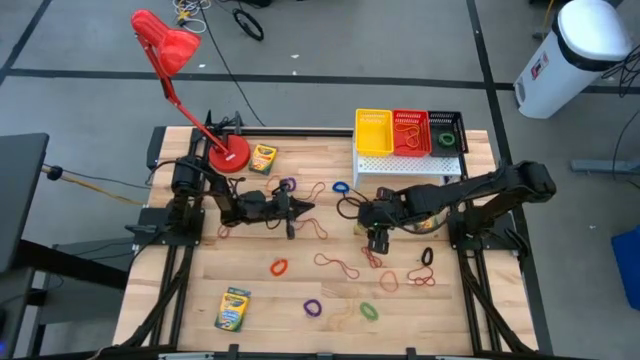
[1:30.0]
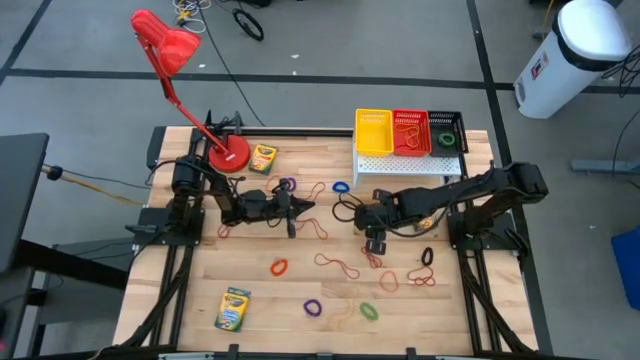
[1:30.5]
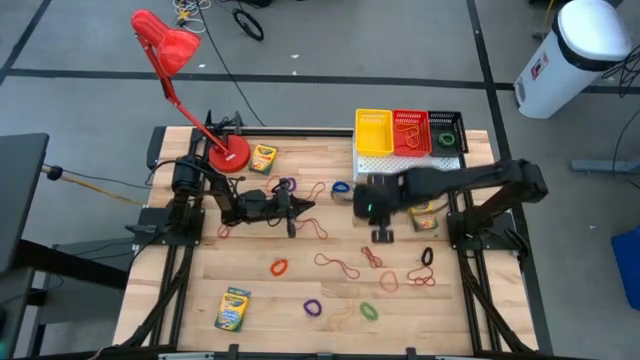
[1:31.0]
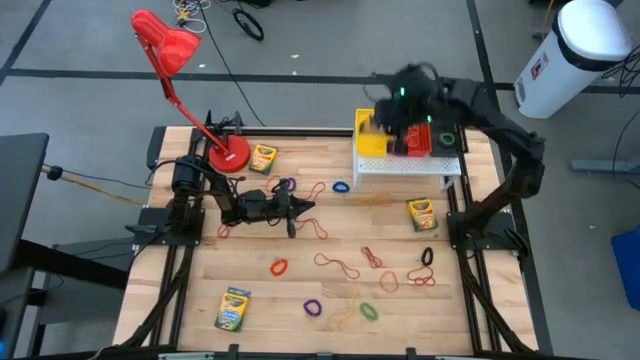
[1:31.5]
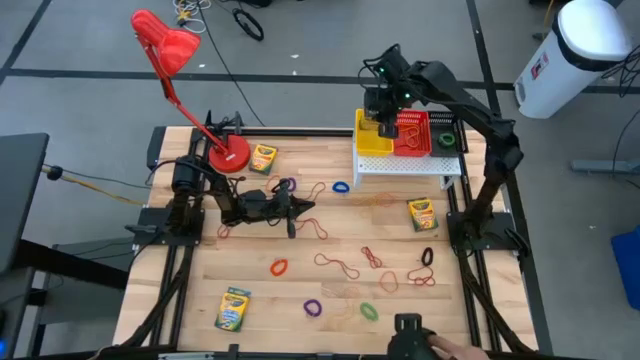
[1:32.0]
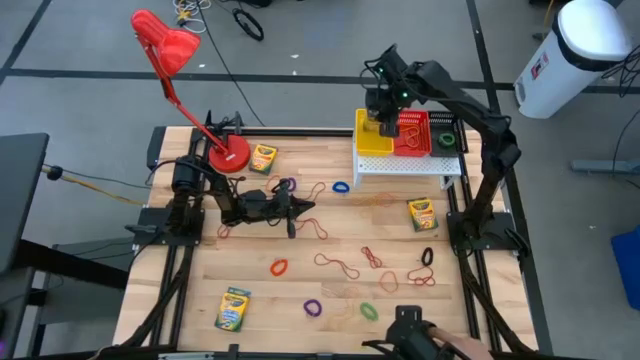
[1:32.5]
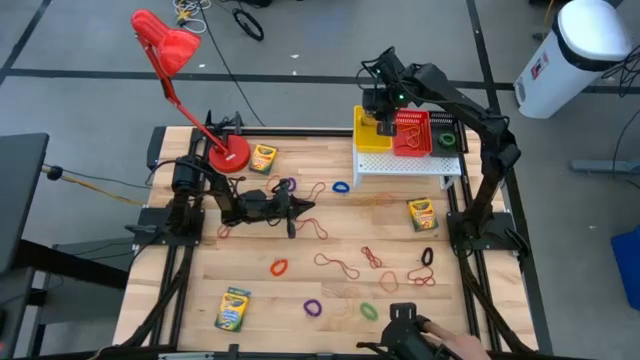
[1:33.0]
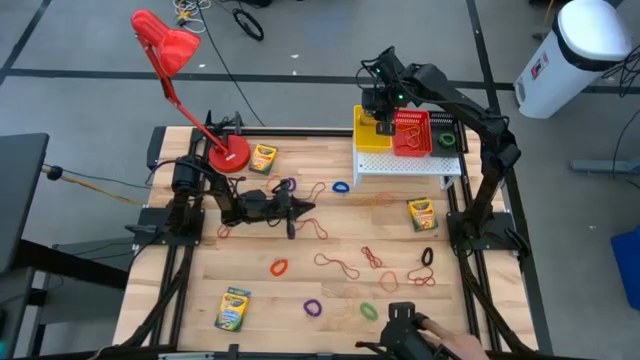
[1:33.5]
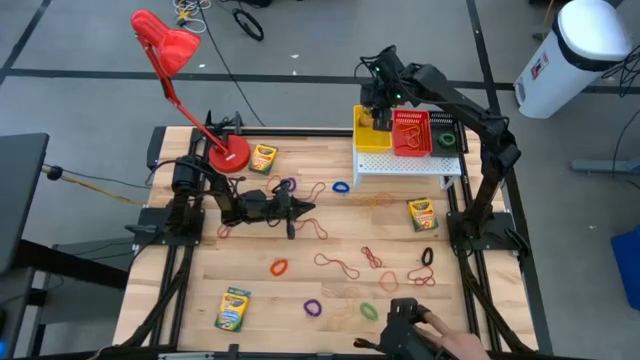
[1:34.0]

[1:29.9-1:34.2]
Task: Pick & Place Office Desk Supplies
Put the yellow crayon box on the yellow basket

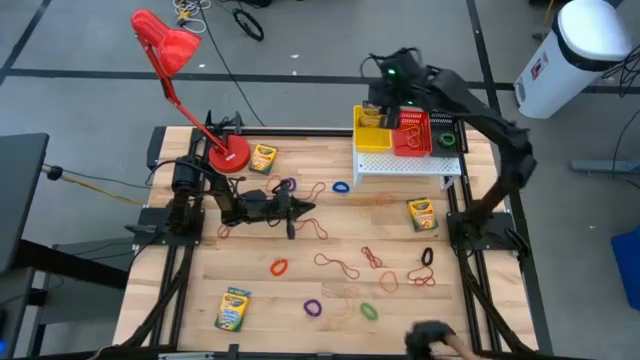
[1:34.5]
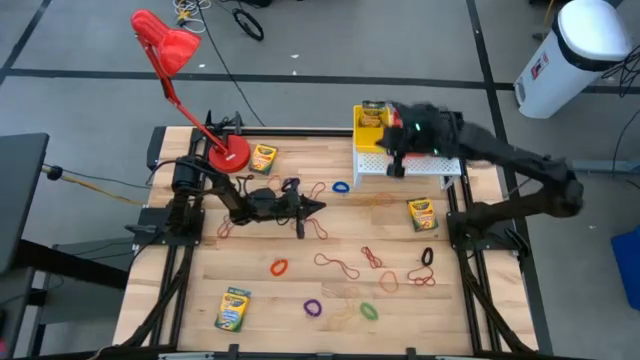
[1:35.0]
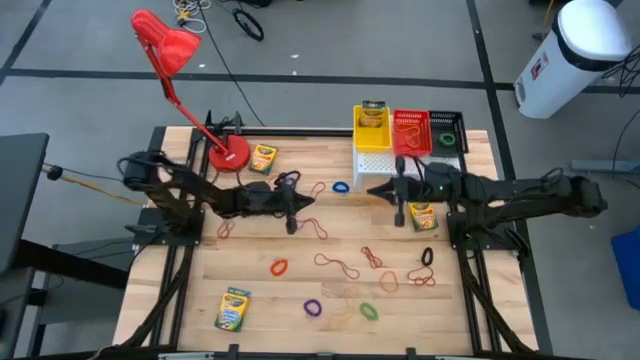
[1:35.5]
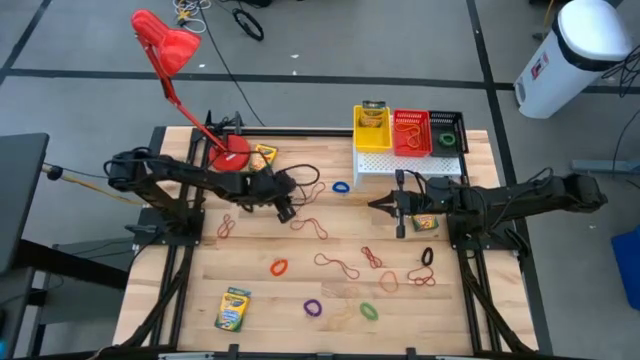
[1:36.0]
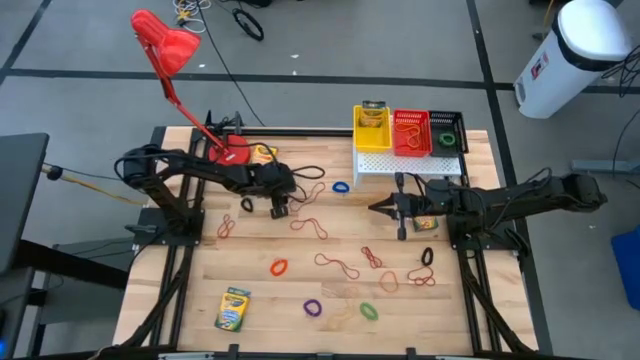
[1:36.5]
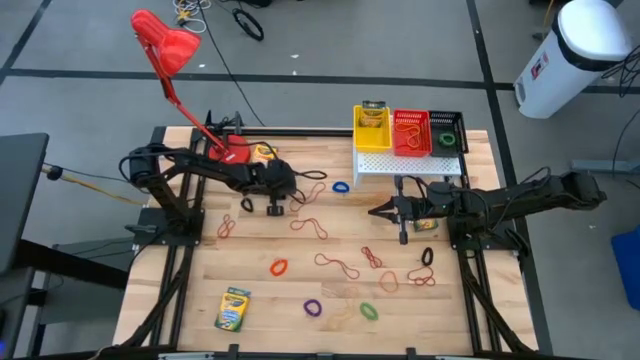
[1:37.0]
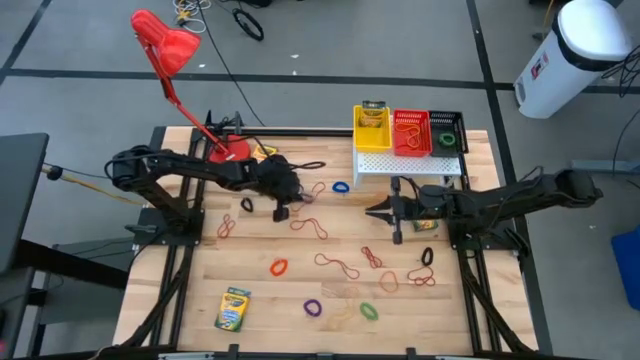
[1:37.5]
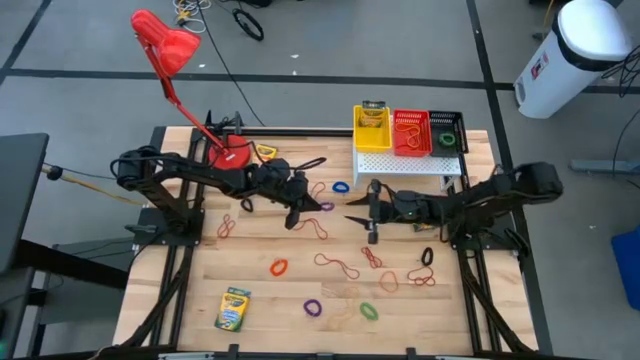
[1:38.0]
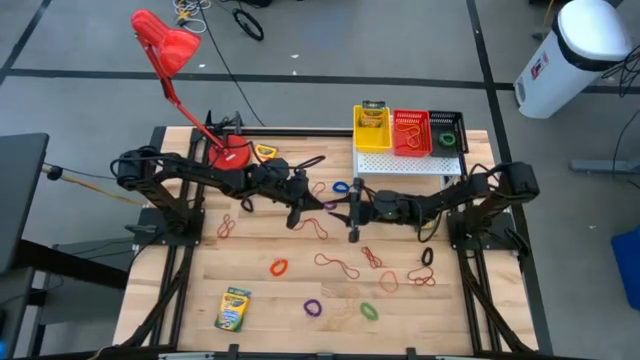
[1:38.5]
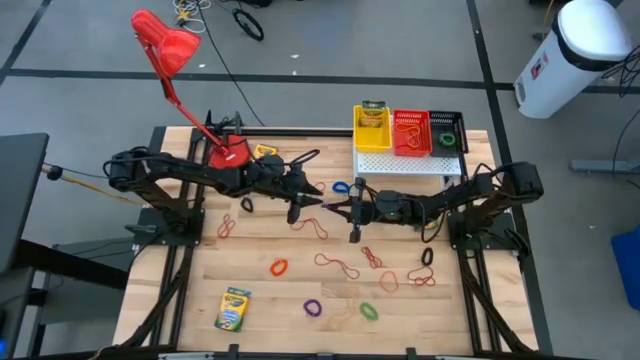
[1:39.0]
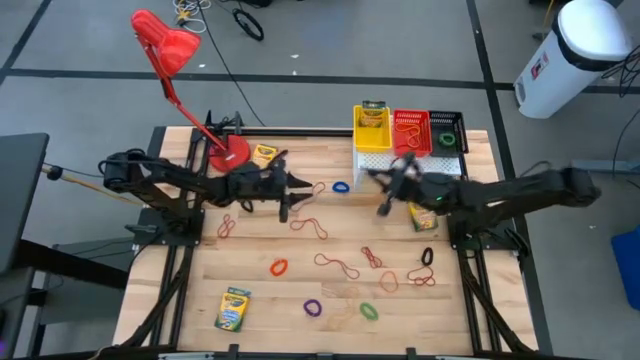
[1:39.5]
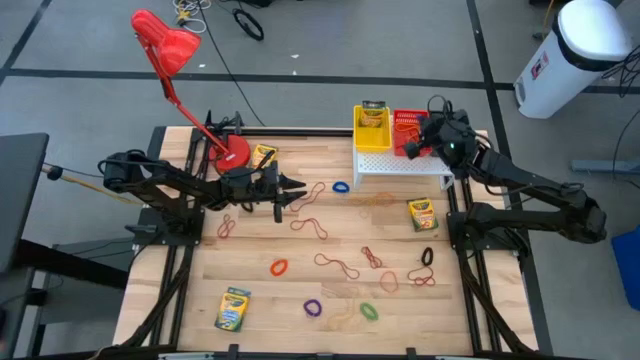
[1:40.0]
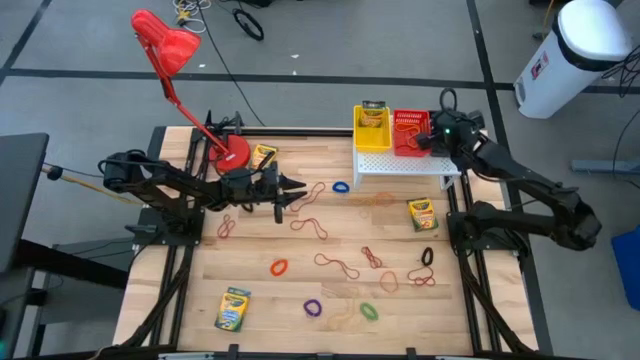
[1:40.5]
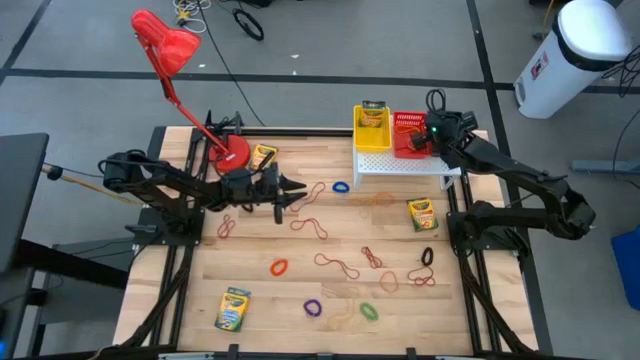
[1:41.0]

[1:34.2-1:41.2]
Put the purple spring keychain on the black basket

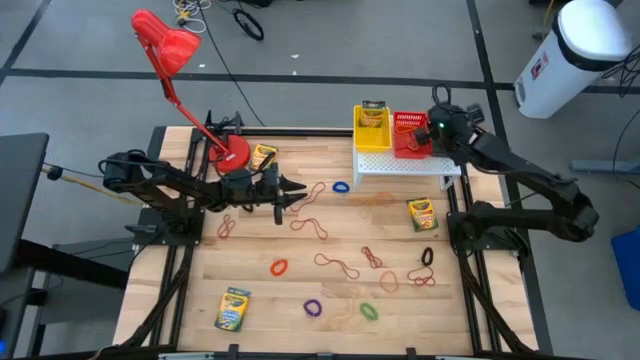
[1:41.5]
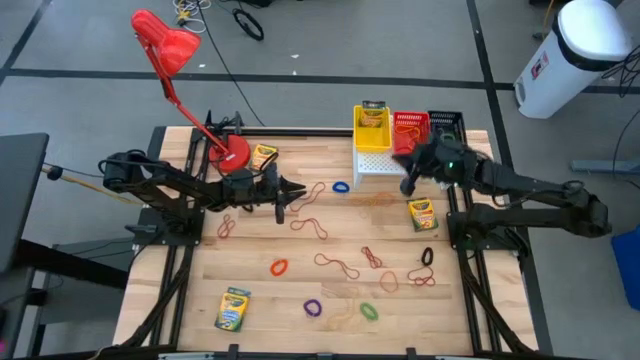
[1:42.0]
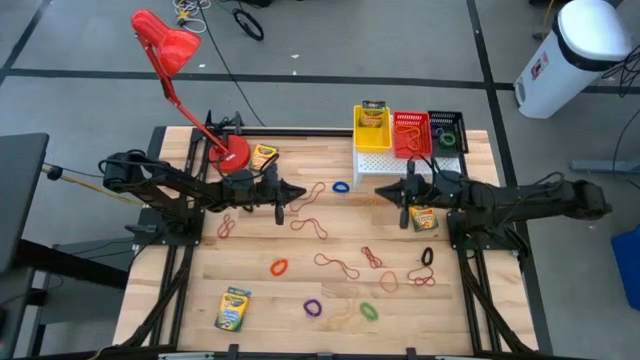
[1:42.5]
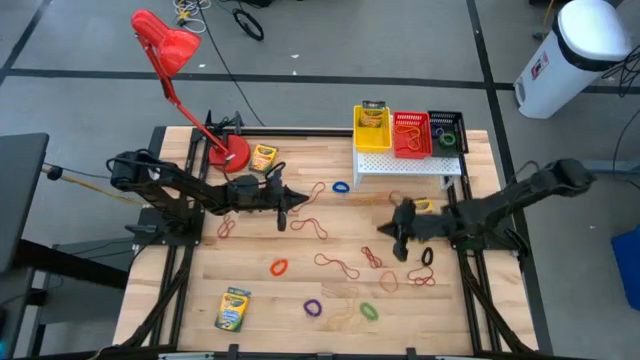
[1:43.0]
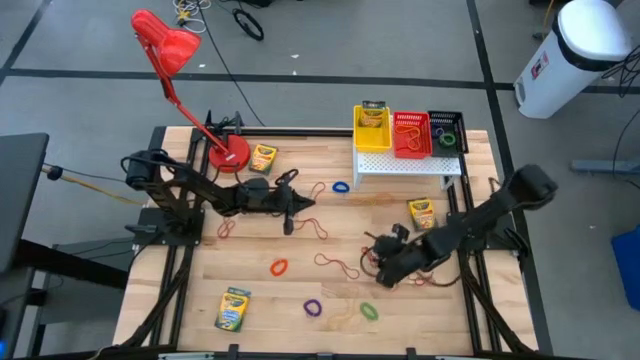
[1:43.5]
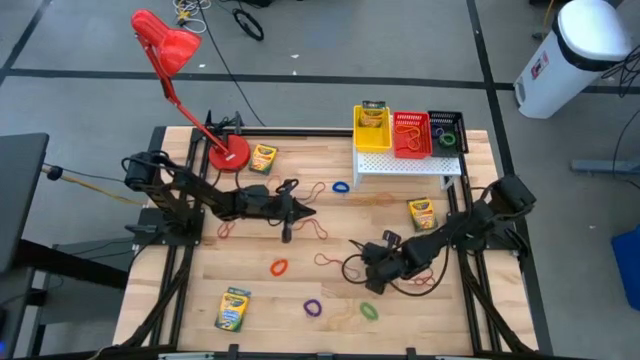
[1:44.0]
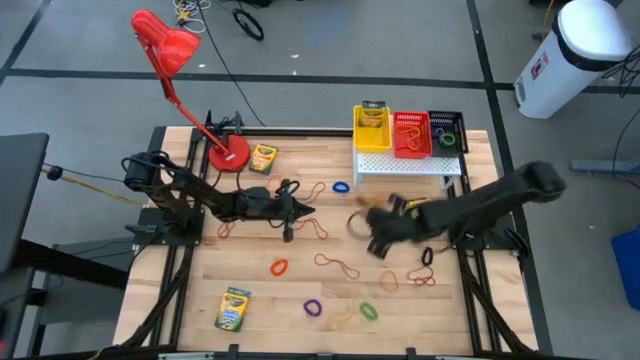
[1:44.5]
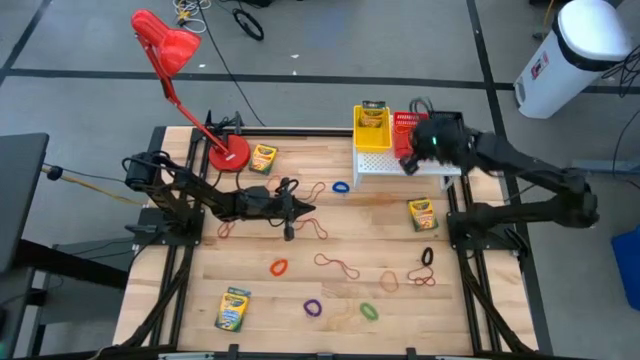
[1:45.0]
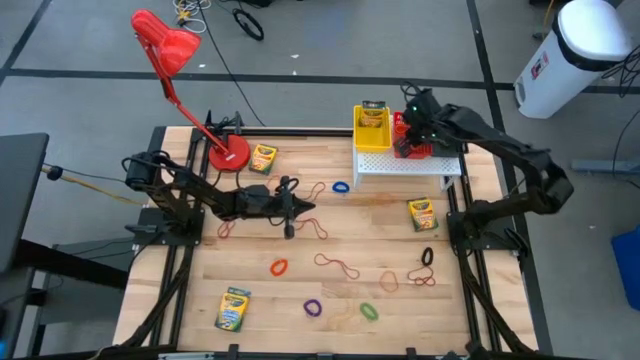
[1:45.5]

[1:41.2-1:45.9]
Put the red rubber band on the red basket

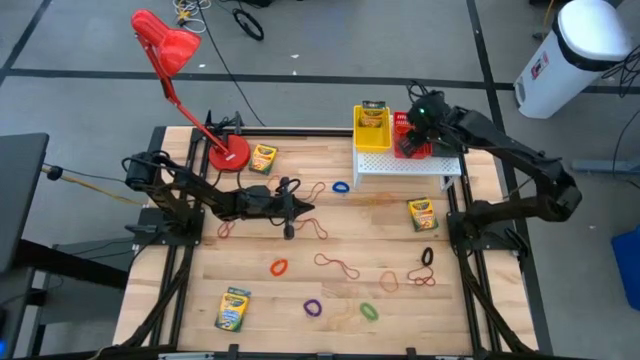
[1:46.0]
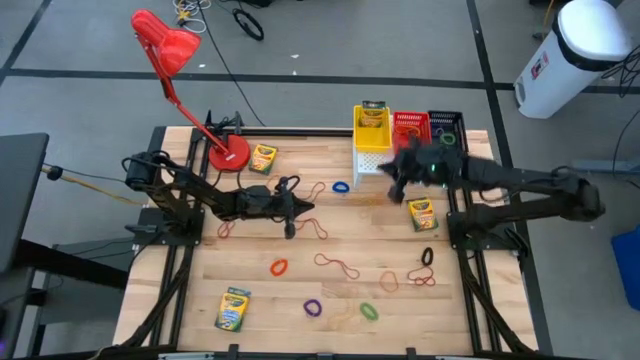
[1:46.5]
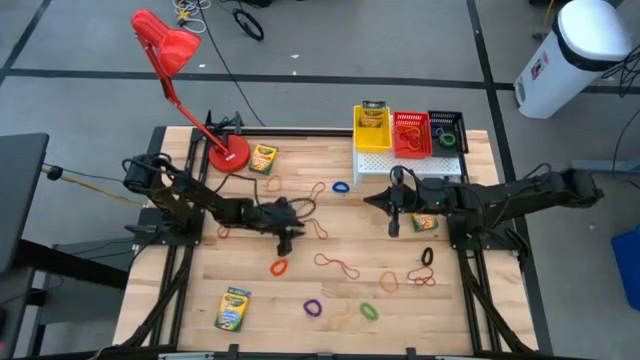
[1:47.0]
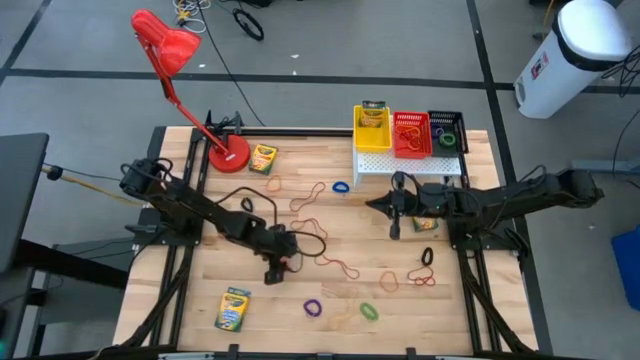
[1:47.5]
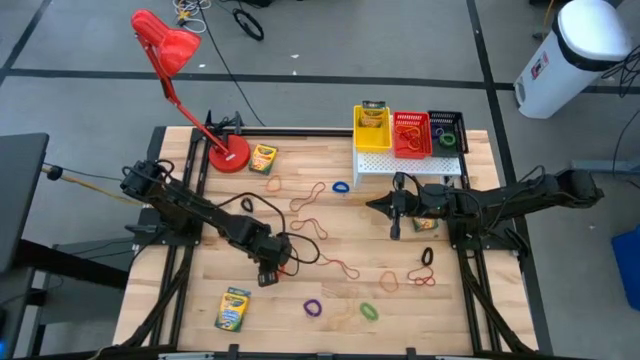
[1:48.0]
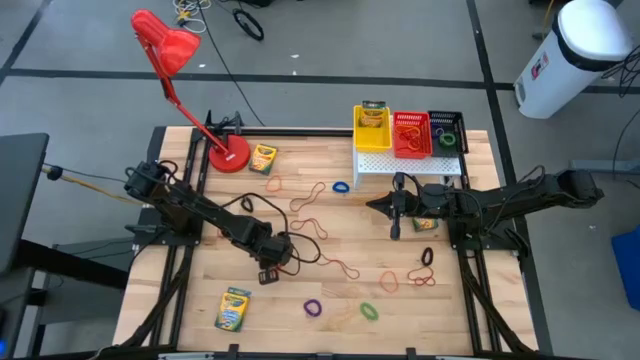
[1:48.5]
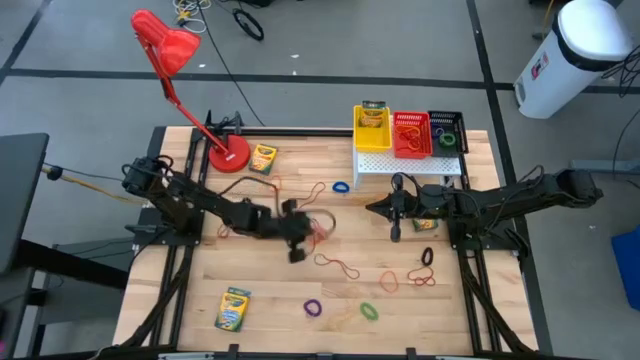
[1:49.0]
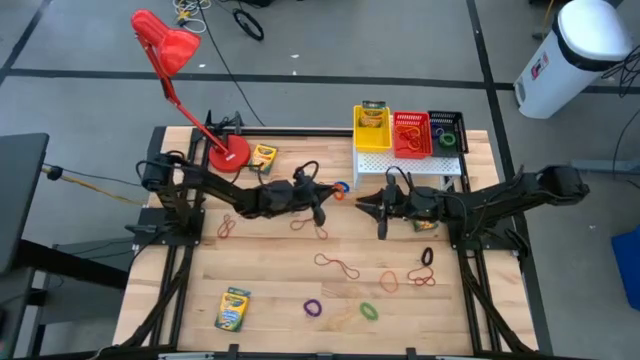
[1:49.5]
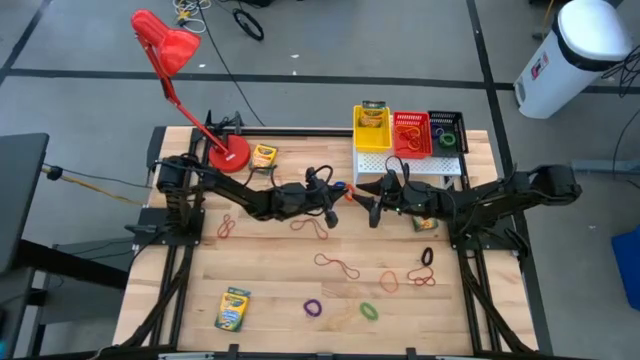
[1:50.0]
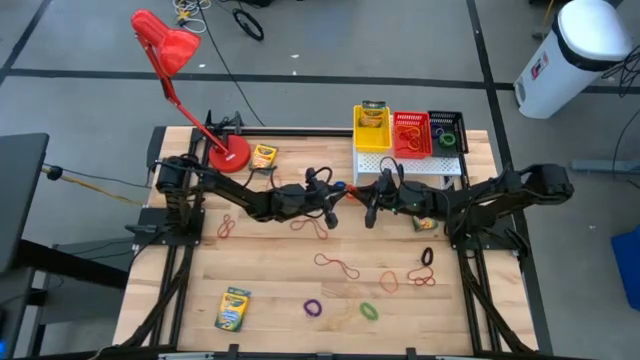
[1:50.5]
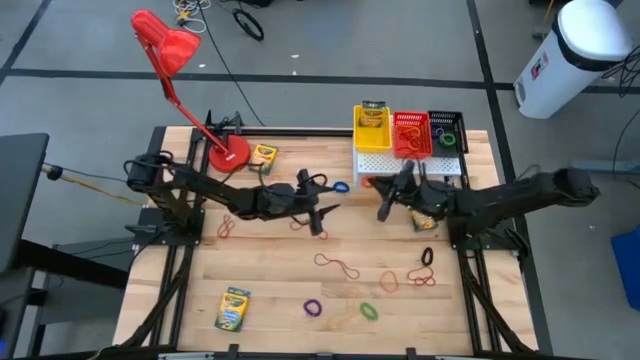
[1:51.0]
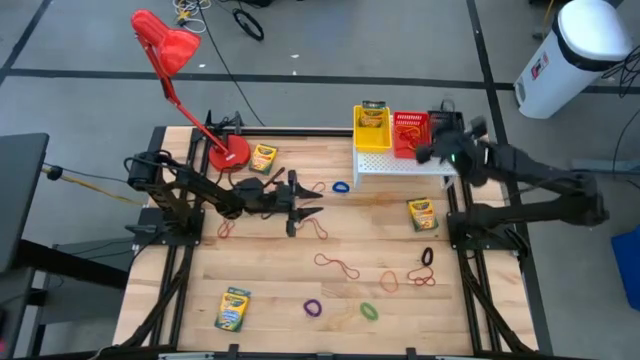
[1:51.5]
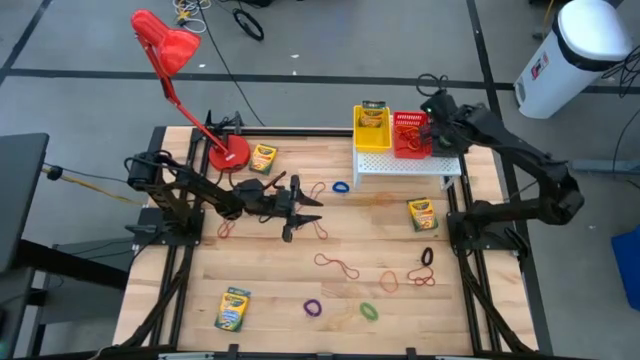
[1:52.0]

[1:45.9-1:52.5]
Put the orange spring keychain on the black basket
